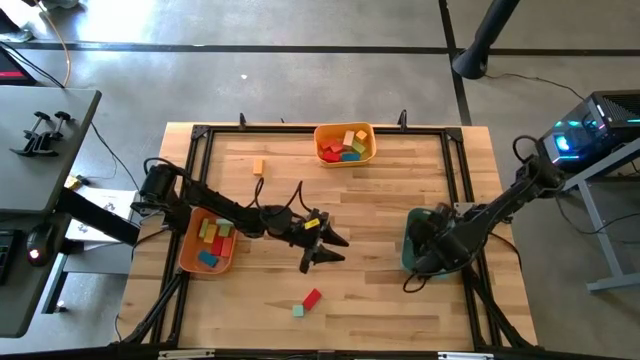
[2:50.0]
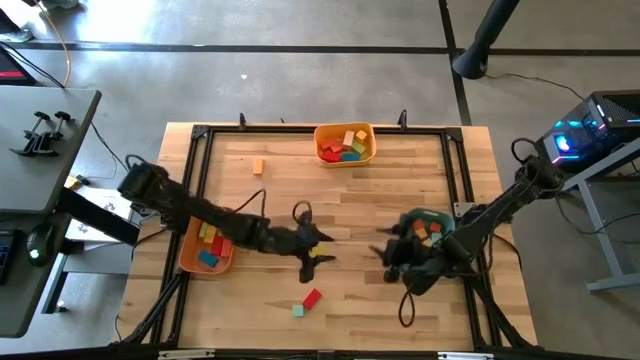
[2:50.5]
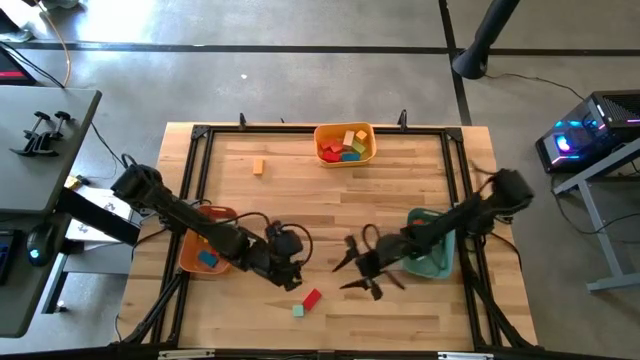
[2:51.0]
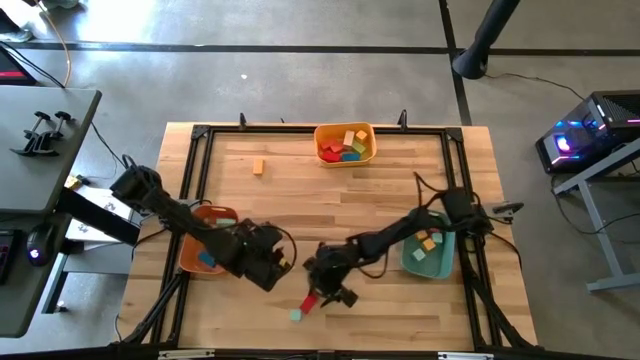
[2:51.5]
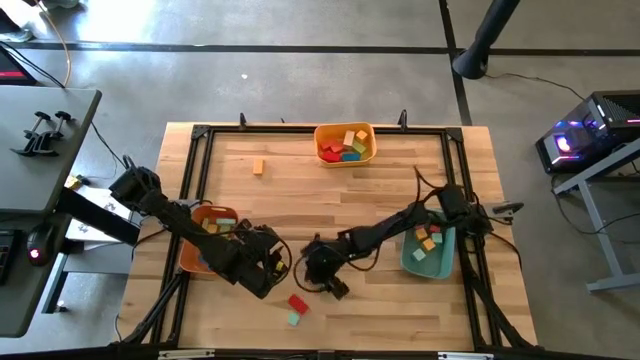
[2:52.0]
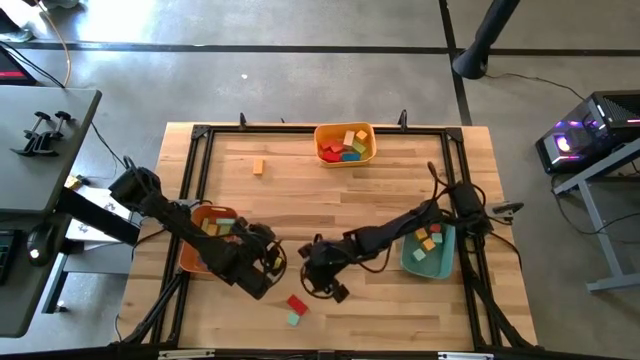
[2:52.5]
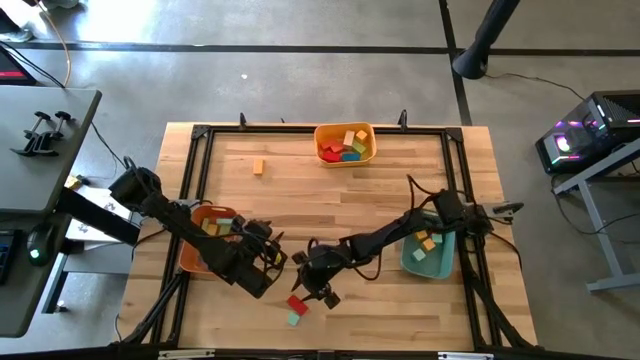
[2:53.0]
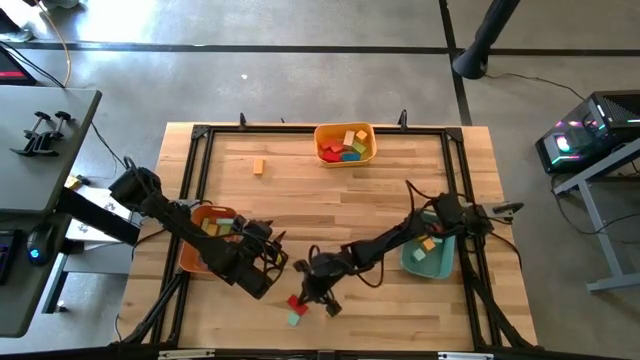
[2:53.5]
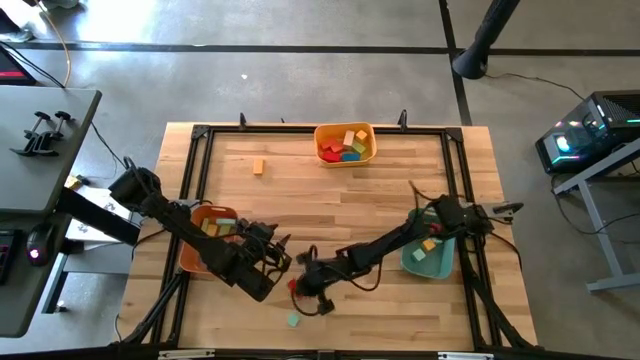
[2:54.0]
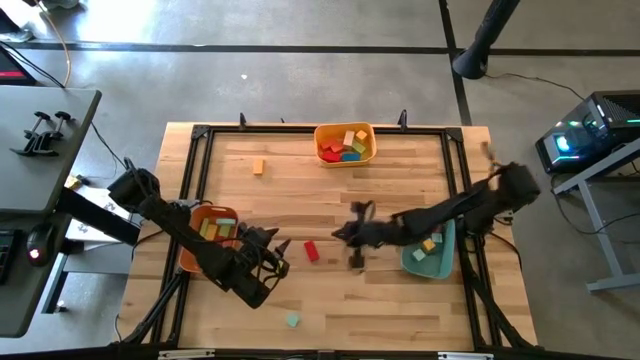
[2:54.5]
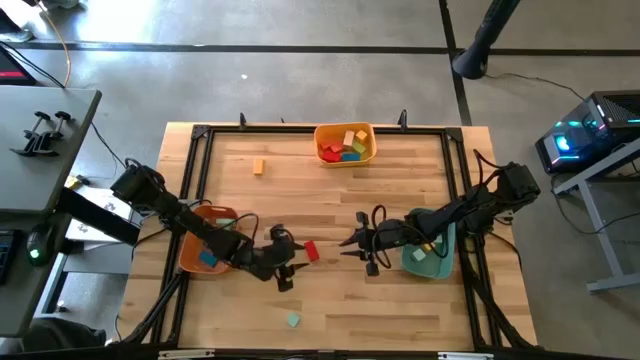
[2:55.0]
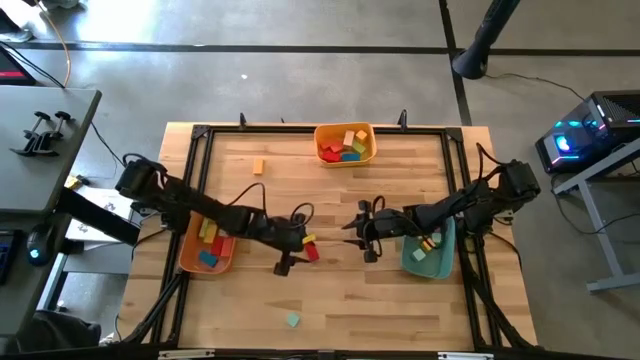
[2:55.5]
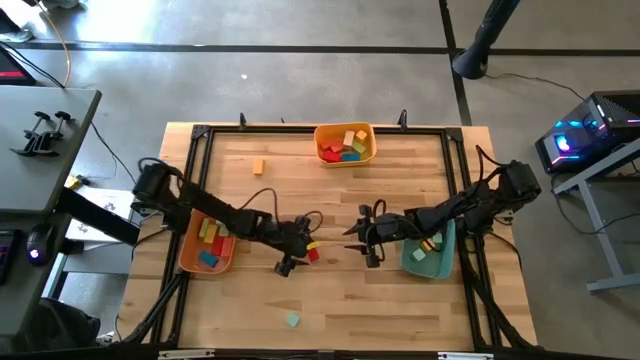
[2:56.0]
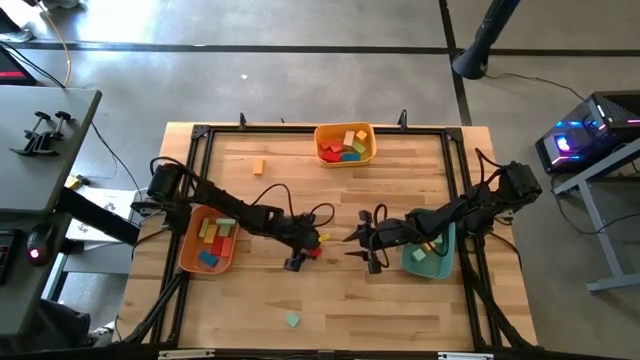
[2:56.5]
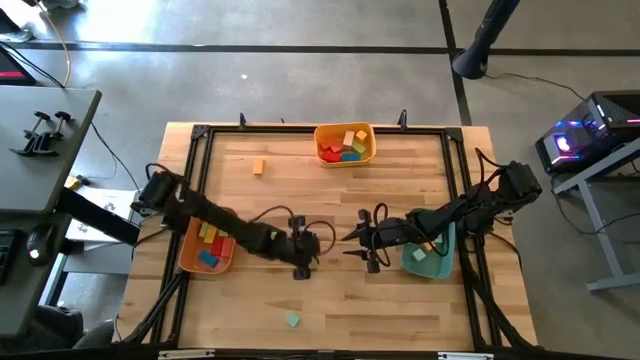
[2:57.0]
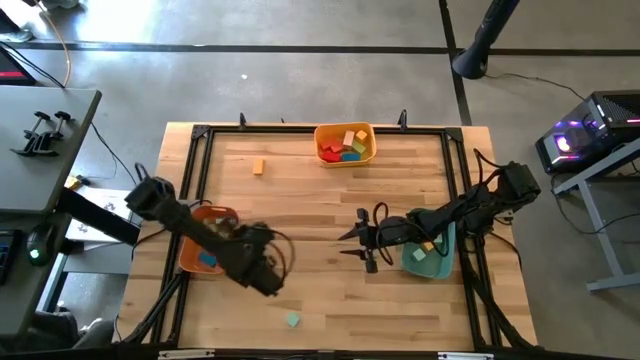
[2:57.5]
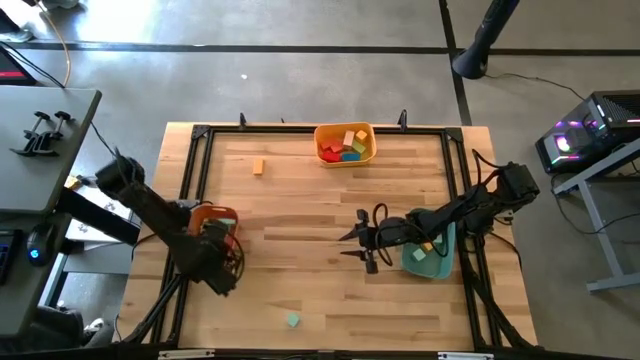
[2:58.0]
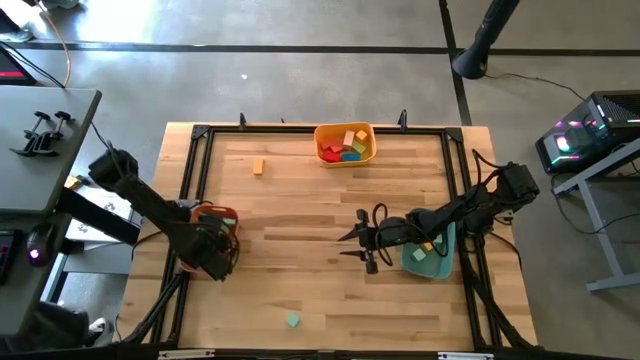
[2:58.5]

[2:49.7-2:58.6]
Task: Sort blocks by size
Put the red medium block into the orange bin

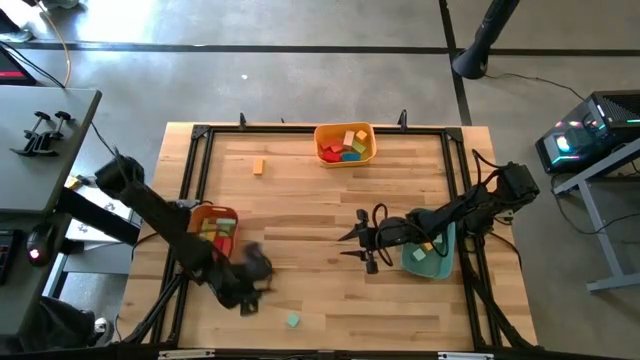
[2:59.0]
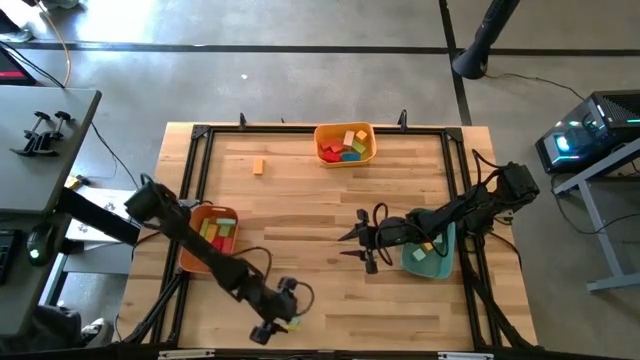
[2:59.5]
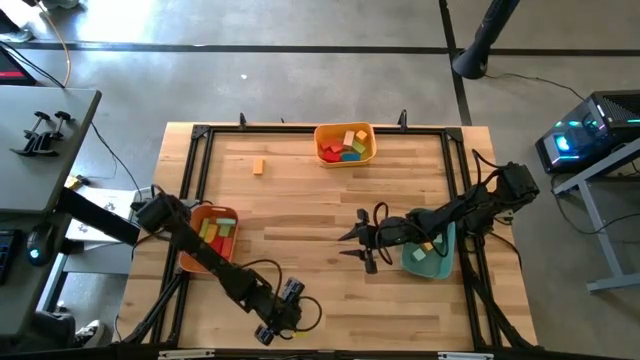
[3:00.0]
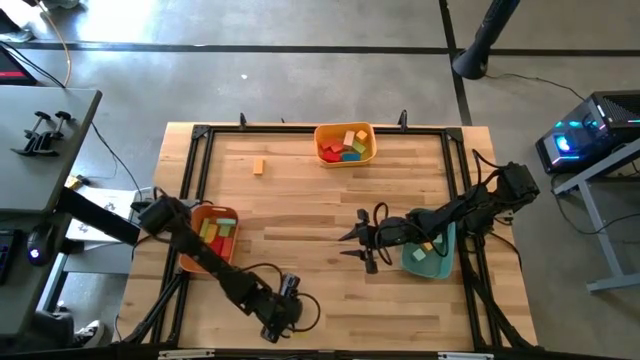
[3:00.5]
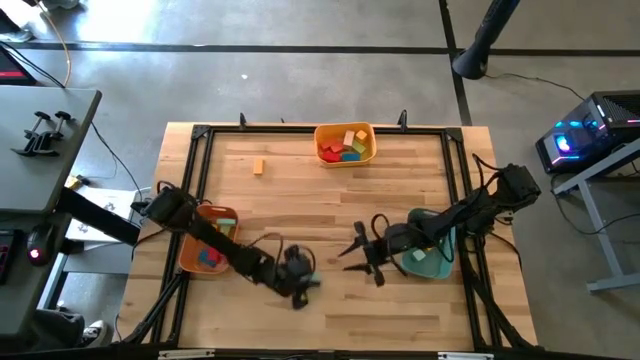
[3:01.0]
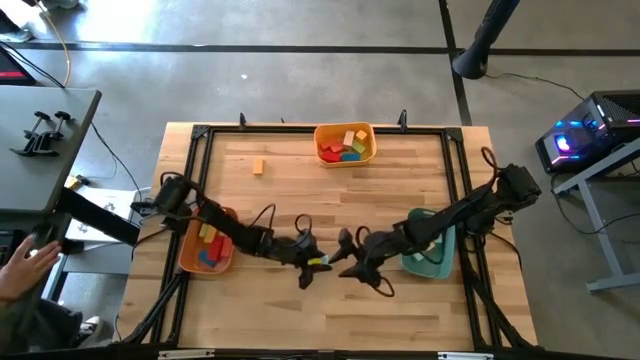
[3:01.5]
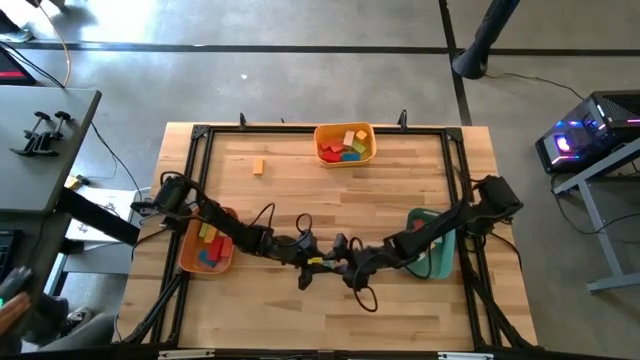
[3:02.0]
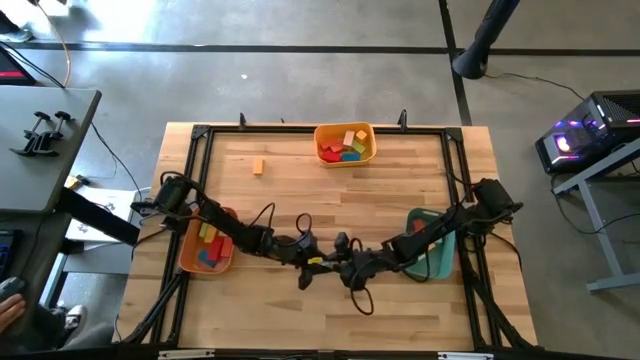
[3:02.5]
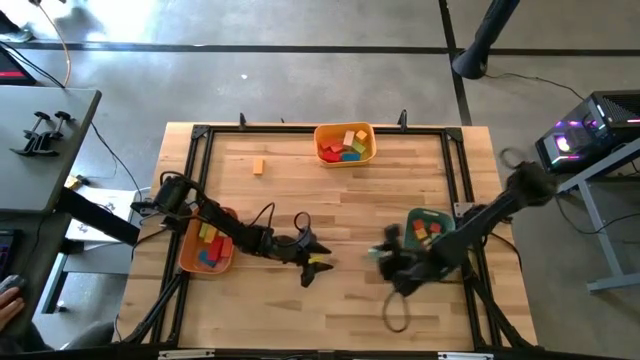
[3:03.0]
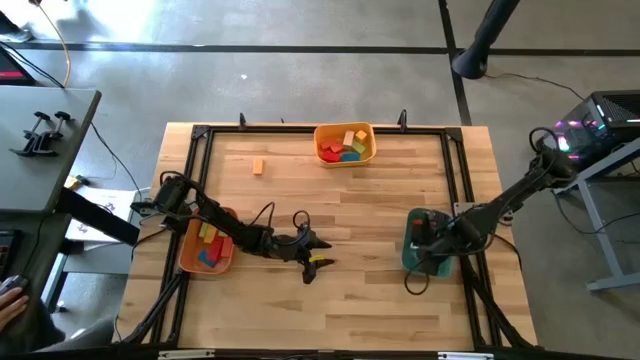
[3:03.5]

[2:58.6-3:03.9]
Put the light blue small block into the green bin

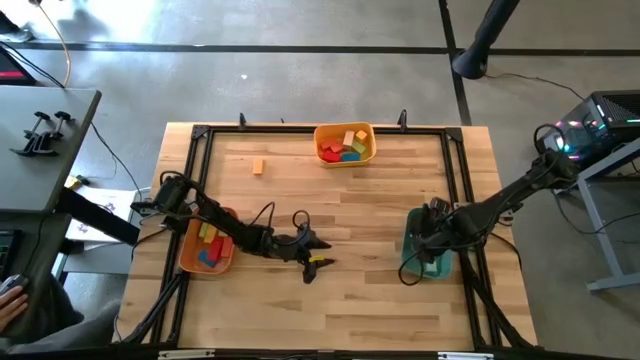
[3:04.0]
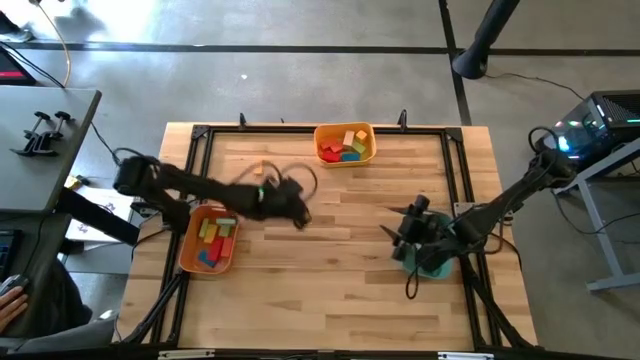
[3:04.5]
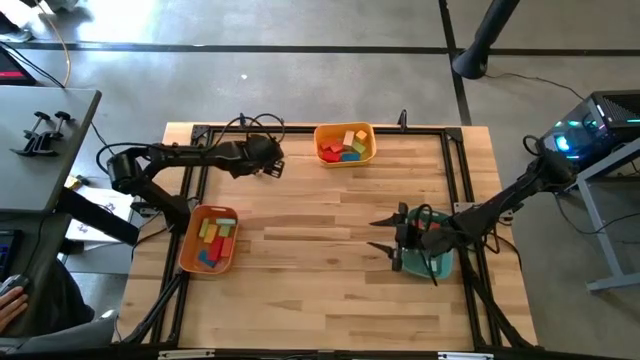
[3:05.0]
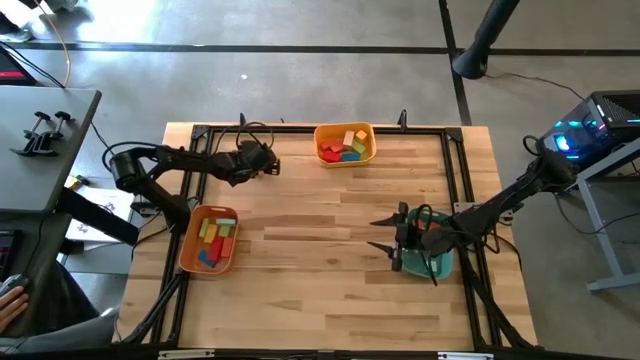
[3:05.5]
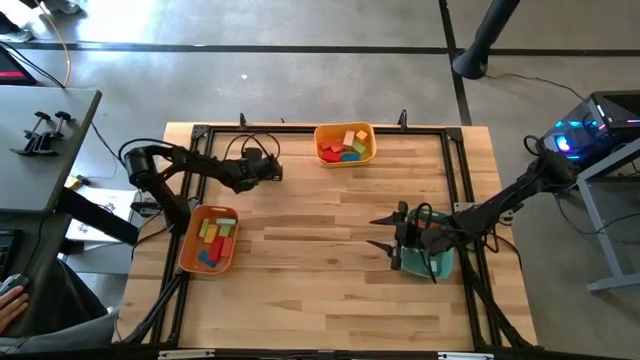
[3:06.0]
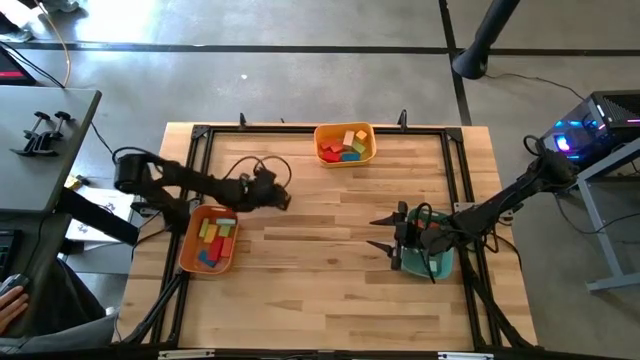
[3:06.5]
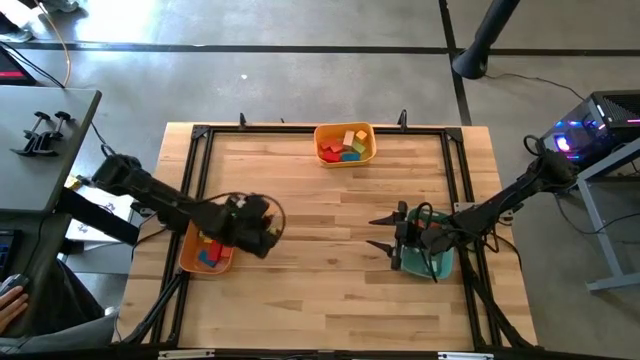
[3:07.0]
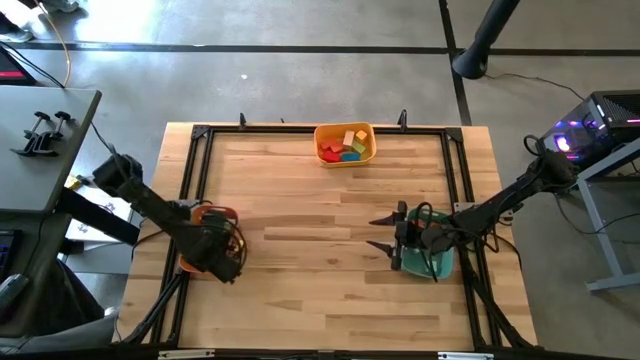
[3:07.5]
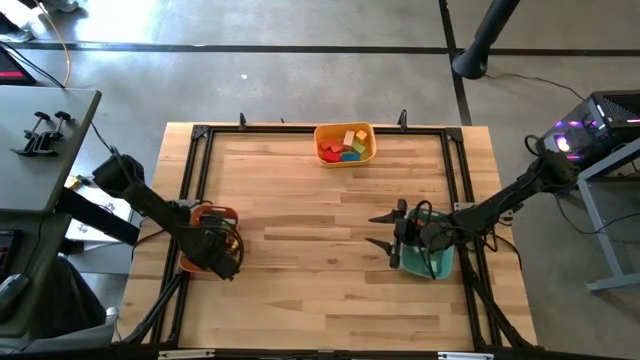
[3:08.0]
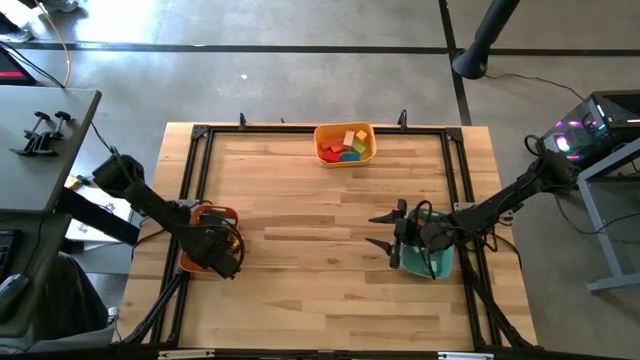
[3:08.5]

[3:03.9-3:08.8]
Put the yellow medium block into the orange bin
